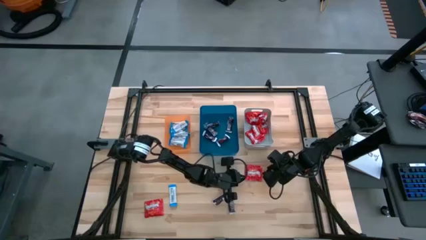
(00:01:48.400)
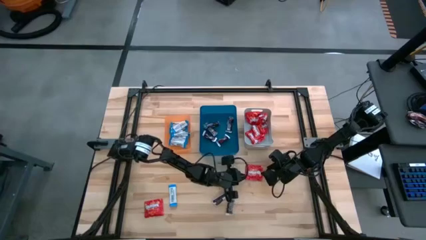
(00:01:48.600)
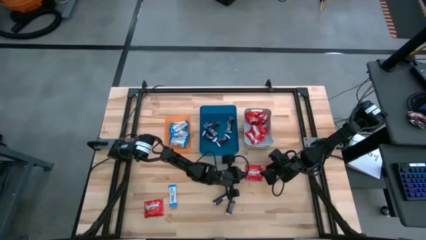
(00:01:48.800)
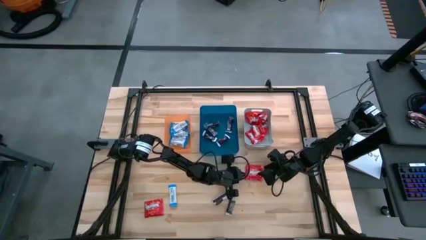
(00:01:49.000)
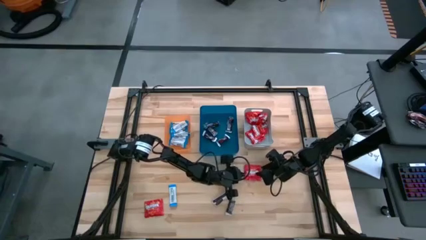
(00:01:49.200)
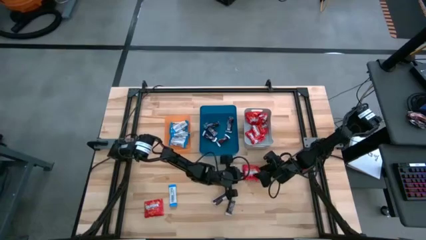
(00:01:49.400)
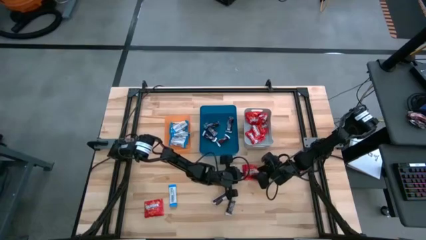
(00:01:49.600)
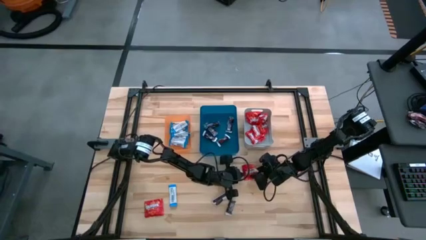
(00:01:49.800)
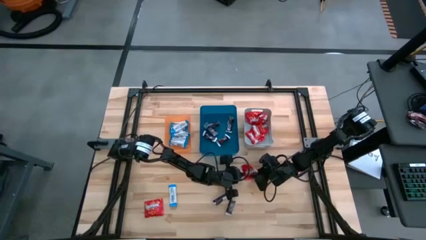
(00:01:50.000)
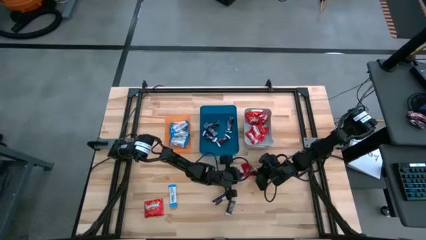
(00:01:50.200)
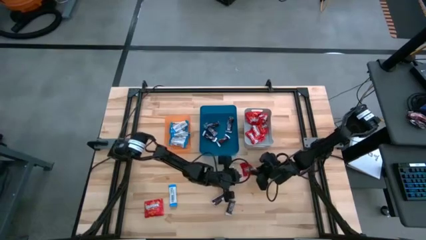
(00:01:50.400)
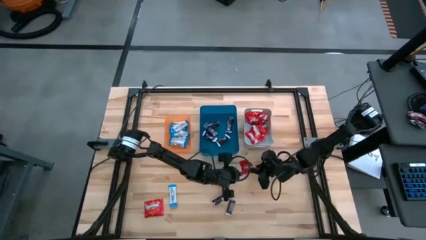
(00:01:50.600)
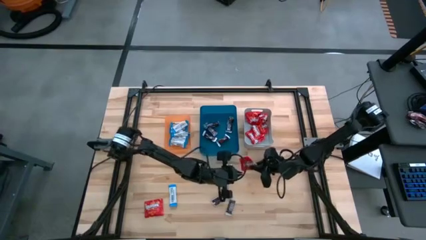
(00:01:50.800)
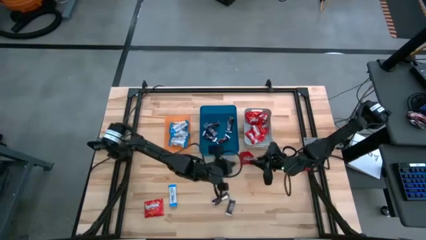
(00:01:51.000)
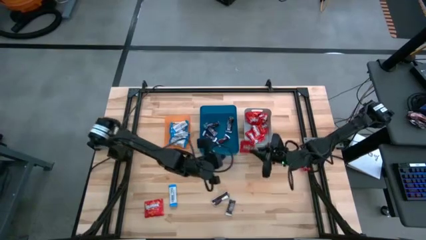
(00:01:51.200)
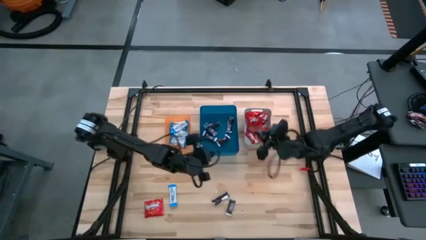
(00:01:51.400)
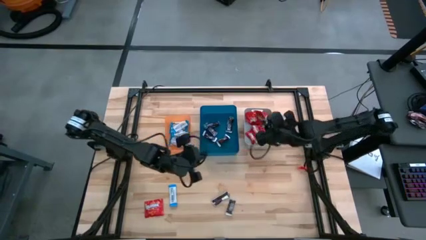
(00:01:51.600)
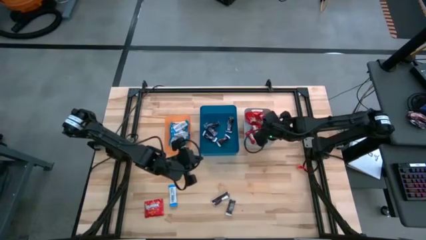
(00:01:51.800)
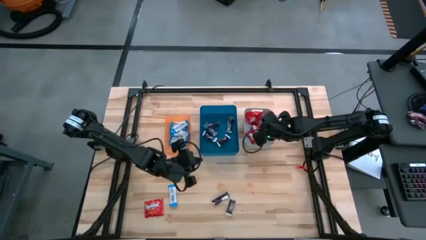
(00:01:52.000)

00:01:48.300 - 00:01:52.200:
Task: Sort candy
Put the red candy into the gray bin

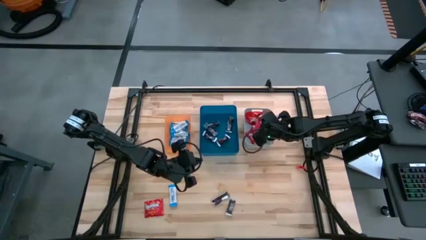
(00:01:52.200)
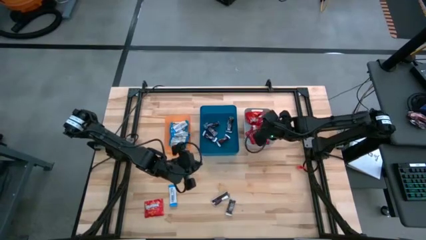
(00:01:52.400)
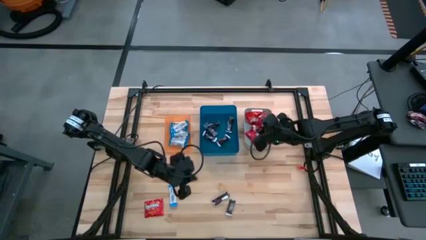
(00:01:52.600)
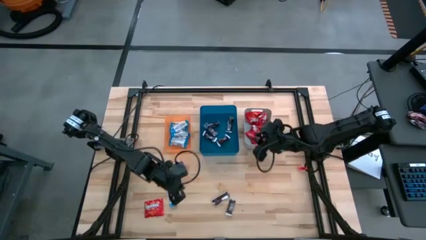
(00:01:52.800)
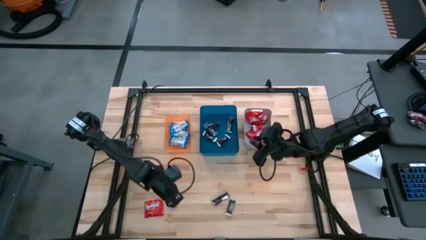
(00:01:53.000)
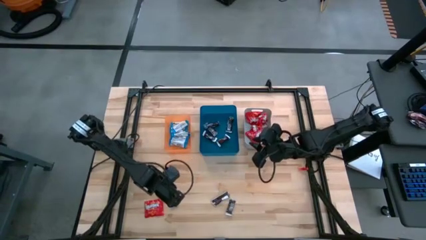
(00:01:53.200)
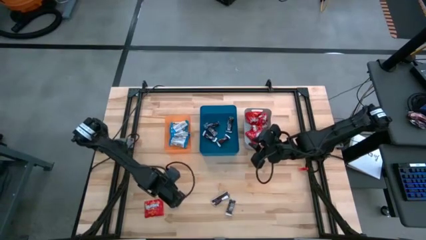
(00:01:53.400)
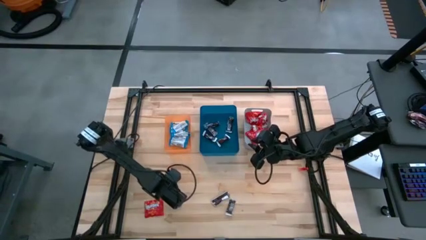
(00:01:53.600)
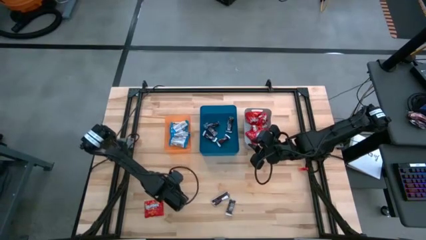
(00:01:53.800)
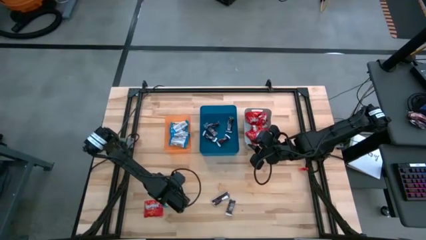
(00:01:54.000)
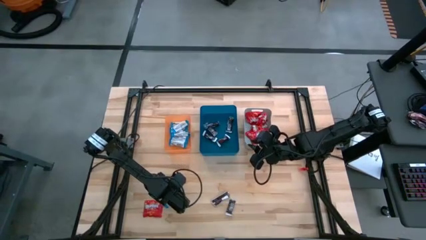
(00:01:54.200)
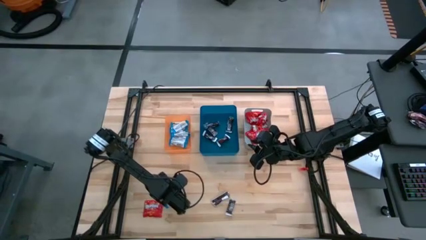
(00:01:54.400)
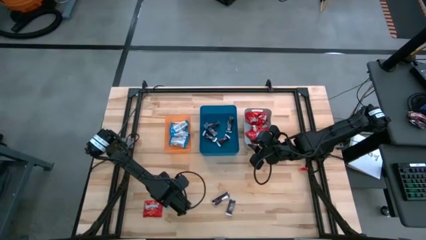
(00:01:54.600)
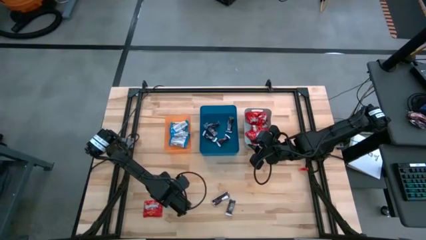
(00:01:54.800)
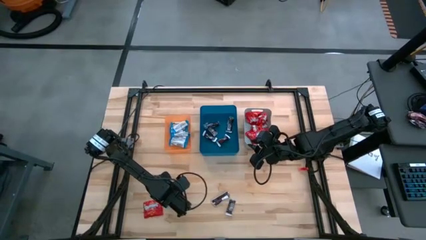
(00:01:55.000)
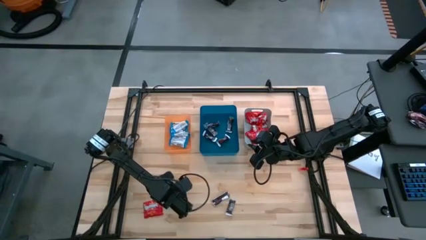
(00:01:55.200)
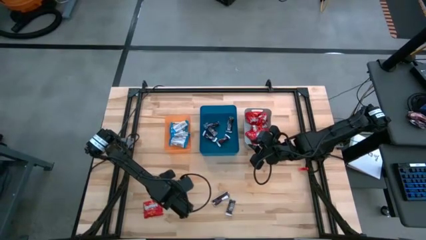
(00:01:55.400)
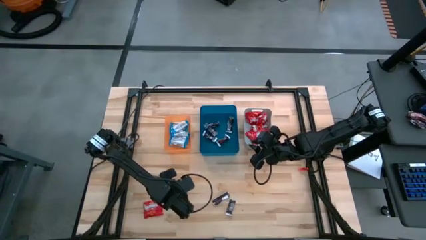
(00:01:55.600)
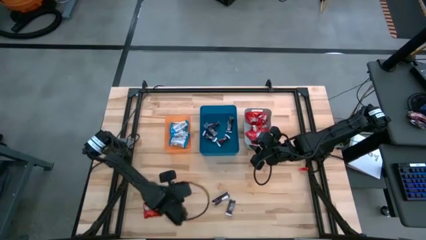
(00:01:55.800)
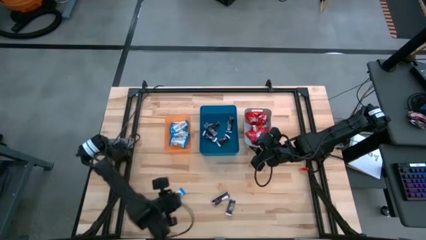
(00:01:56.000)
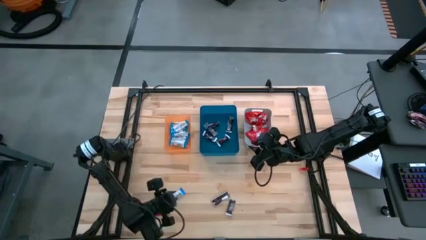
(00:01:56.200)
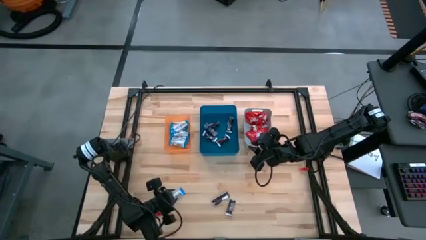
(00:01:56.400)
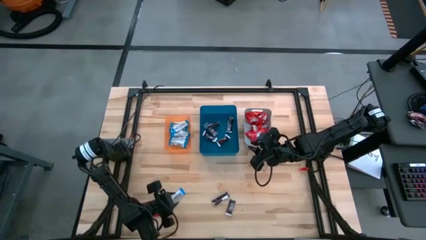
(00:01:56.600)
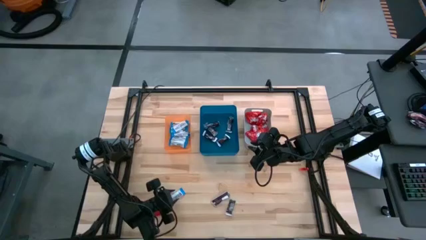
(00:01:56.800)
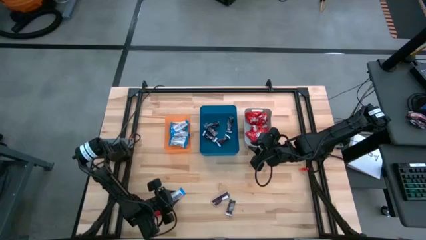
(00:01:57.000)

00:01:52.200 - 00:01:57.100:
Put the white chocolate bar into the orange bin

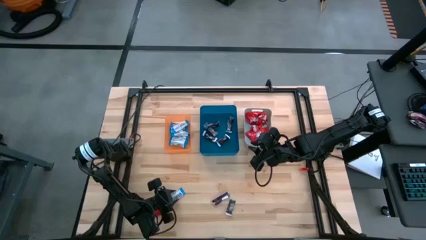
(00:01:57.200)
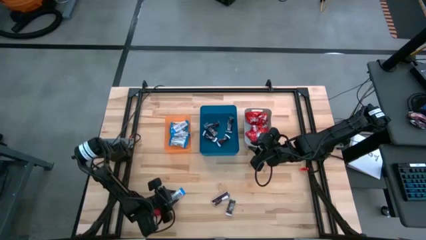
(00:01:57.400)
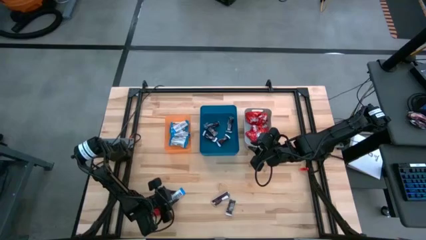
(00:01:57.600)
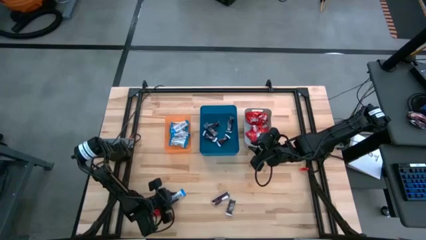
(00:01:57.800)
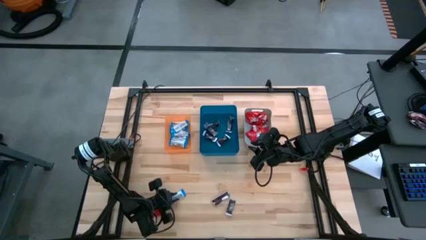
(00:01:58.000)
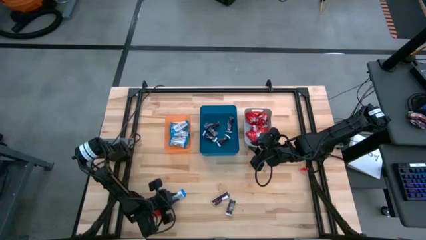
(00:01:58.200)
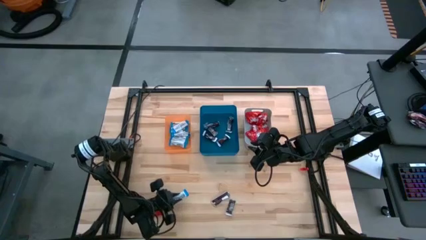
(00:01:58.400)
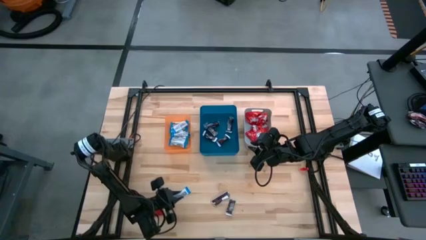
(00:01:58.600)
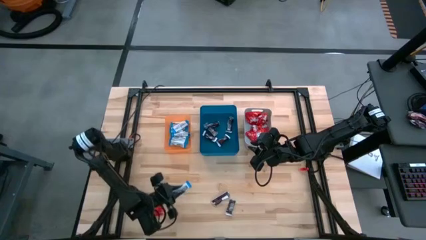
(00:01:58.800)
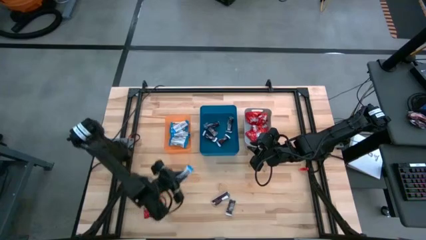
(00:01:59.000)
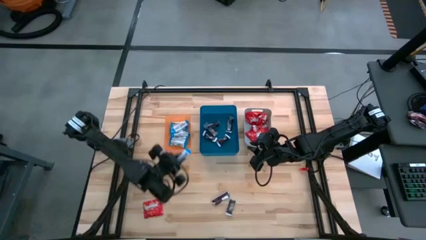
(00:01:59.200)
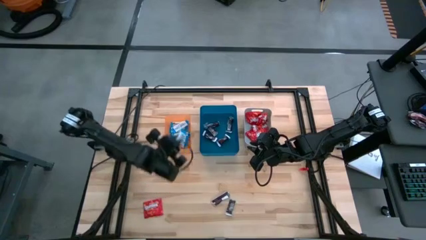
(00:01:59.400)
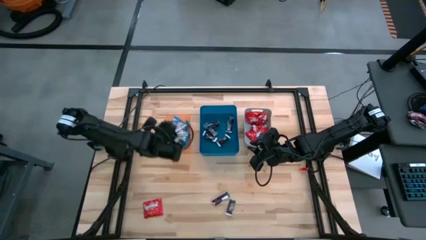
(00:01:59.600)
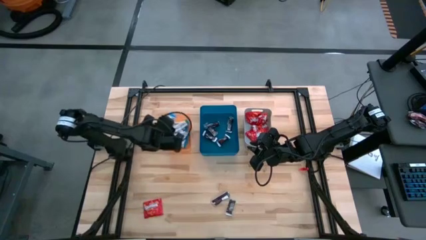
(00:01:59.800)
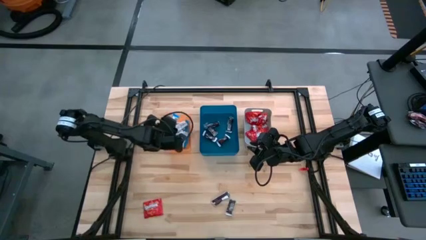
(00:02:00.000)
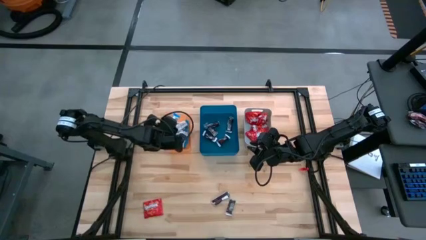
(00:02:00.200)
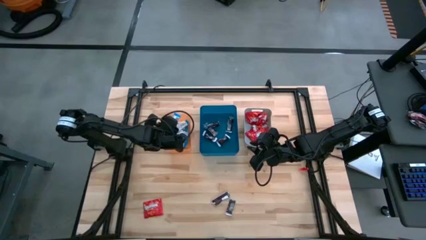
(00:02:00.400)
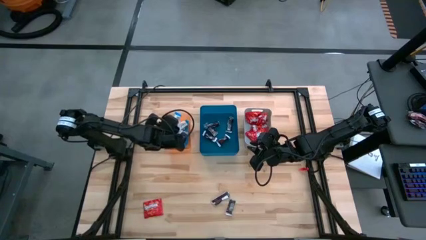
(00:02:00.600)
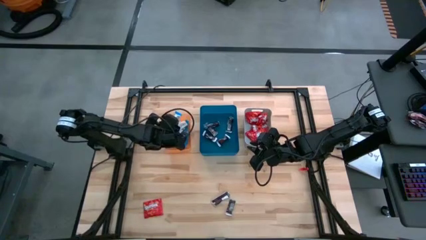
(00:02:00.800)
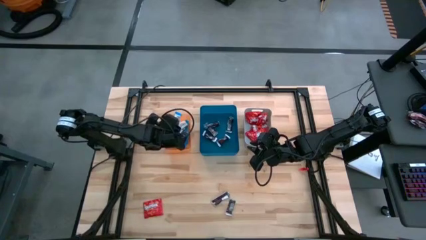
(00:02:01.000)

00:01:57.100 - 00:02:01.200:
Put the white chocolate bar into the orange bin

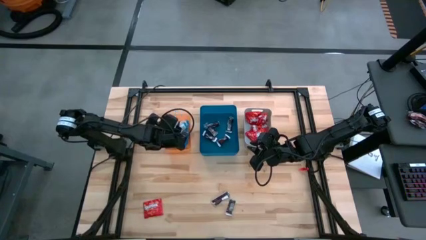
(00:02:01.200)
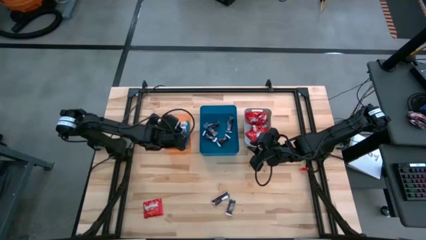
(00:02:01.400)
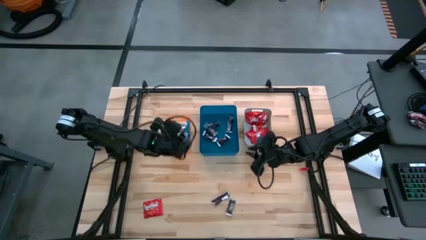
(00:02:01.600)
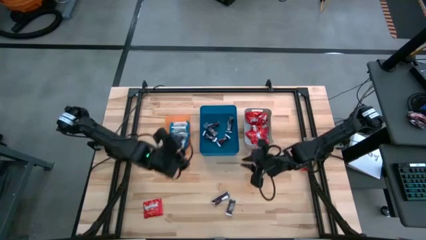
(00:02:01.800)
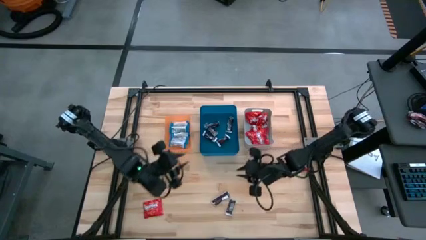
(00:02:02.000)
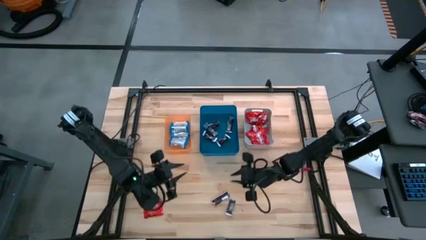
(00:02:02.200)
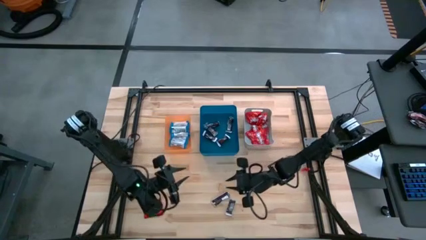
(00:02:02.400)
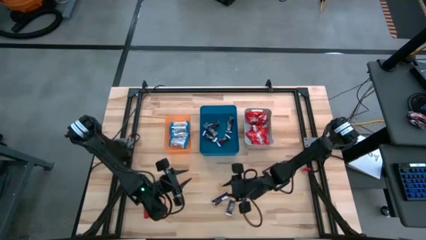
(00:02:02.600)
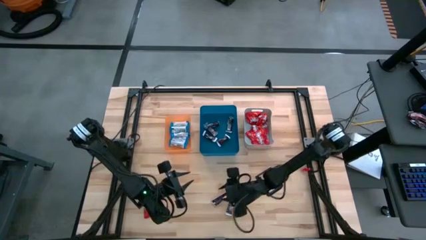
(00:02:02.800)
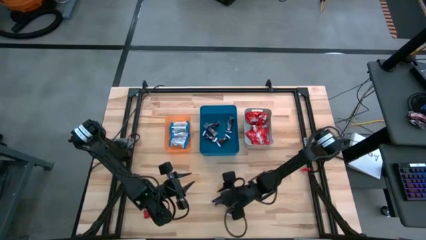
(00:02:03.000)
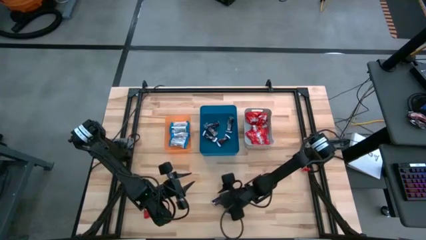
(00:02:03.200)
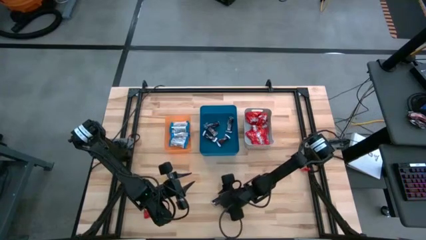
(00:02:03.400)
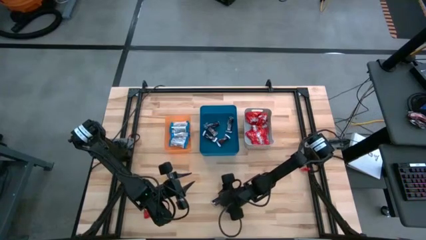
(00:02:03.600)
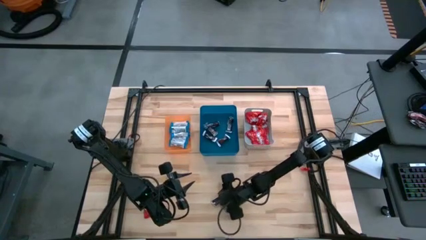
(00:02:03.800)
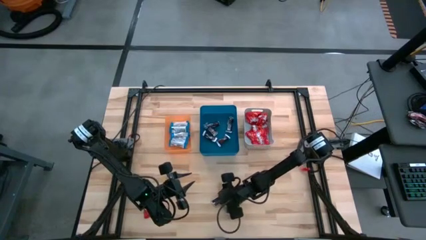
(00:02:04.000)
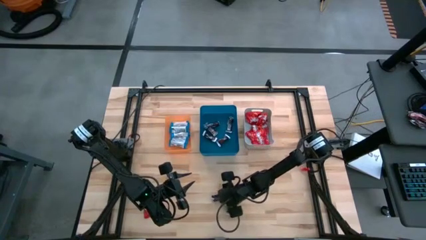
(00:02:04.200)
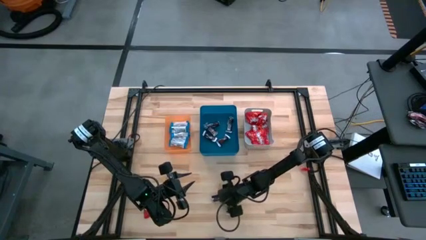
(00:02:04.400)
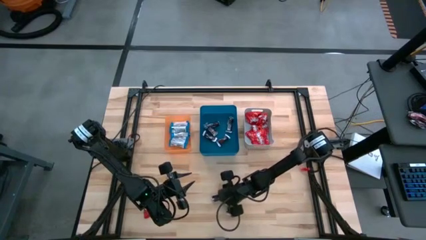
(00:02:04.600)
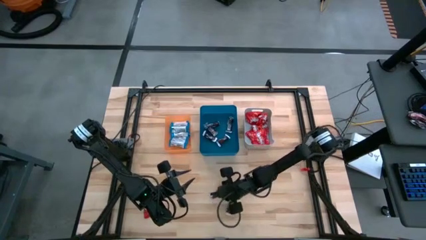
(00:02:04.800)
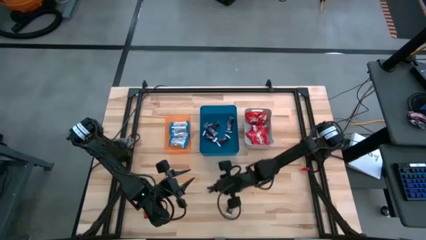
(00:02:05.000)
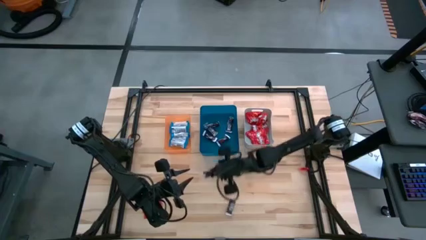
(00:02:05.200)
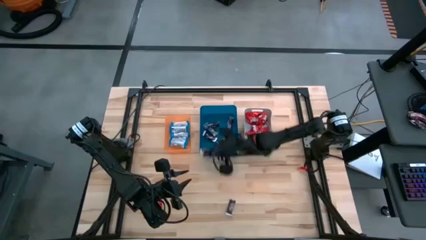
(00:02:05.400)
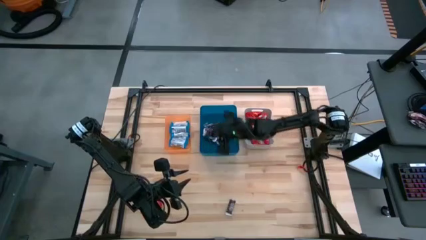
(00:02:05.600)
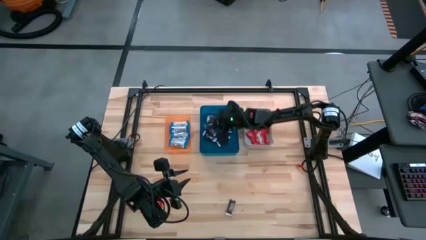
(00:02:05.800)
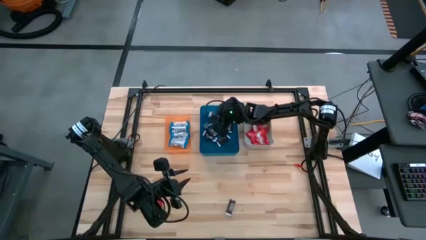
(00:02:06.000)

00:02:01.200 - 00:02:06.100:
Put the brown chocolate bar into the blue bin
